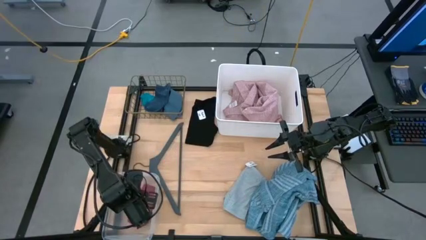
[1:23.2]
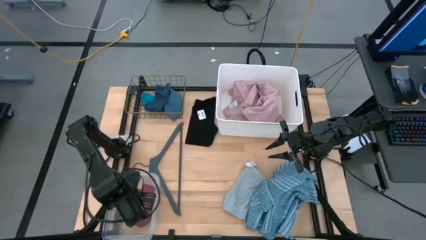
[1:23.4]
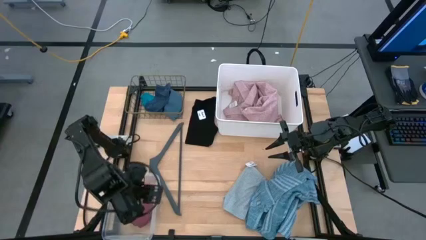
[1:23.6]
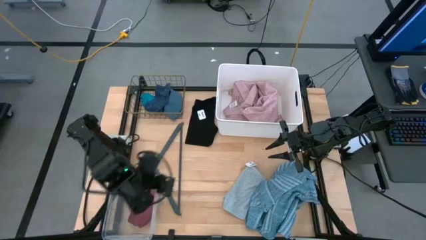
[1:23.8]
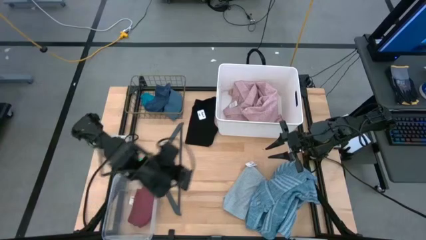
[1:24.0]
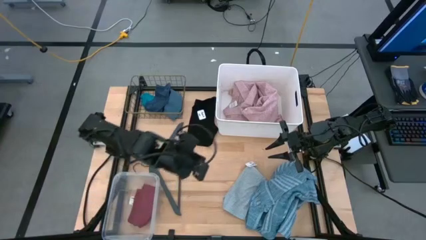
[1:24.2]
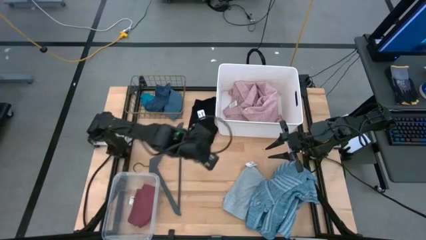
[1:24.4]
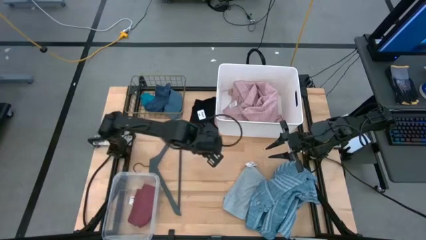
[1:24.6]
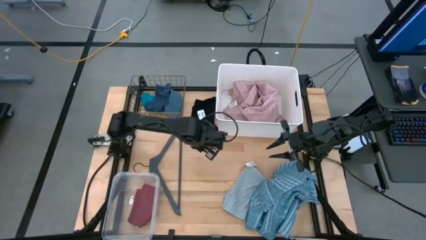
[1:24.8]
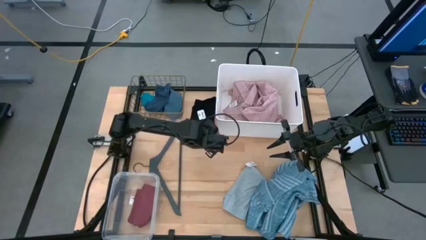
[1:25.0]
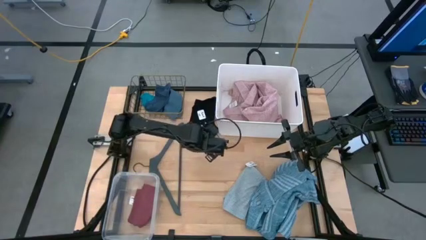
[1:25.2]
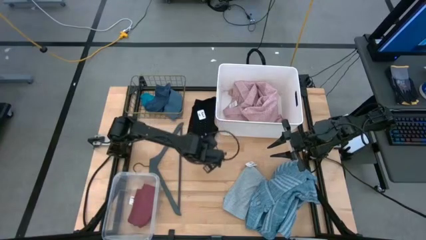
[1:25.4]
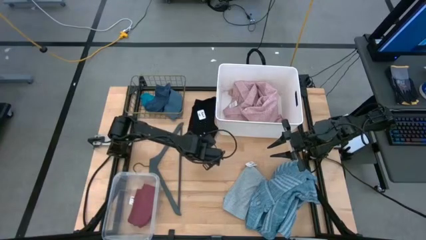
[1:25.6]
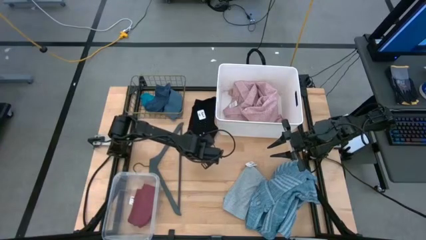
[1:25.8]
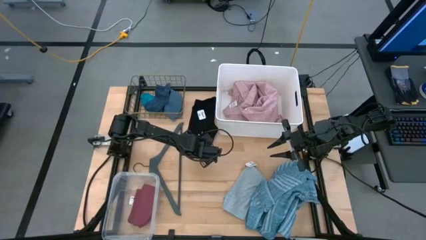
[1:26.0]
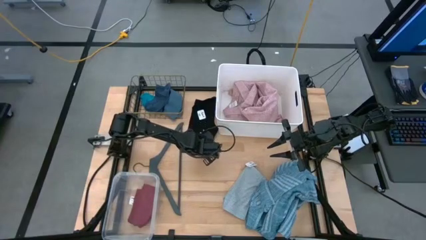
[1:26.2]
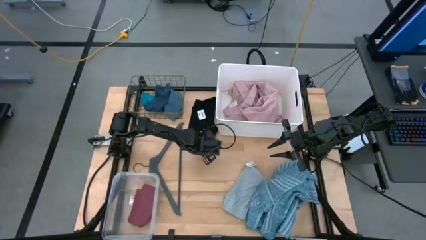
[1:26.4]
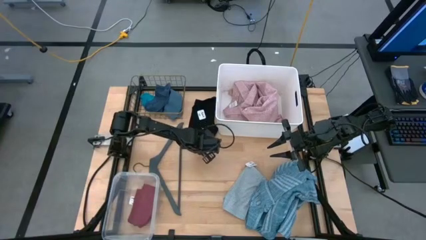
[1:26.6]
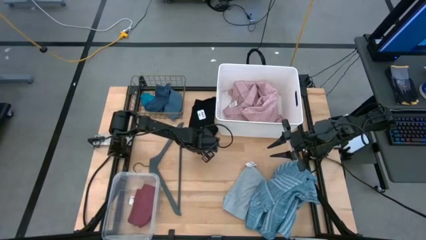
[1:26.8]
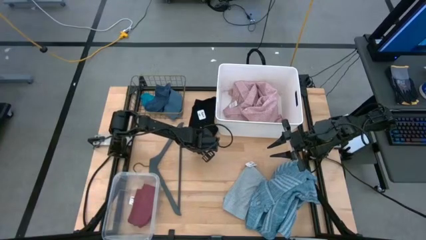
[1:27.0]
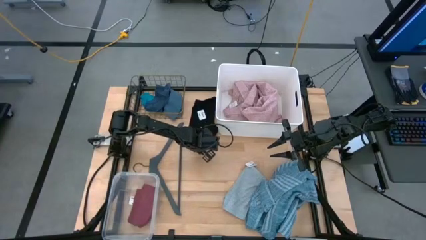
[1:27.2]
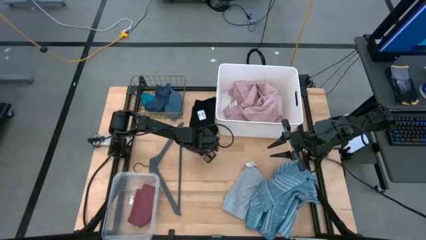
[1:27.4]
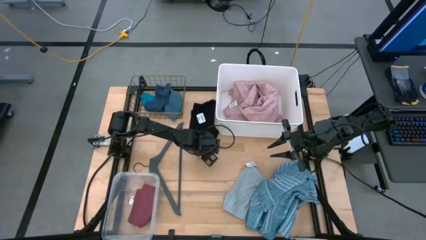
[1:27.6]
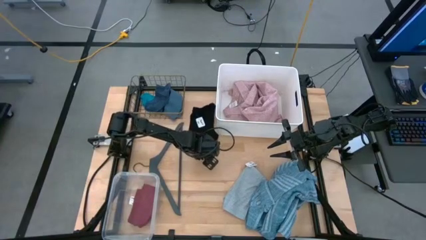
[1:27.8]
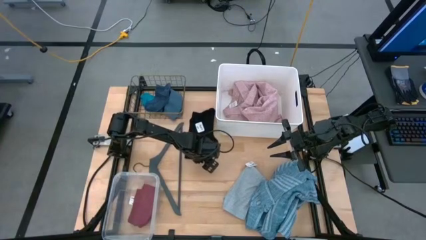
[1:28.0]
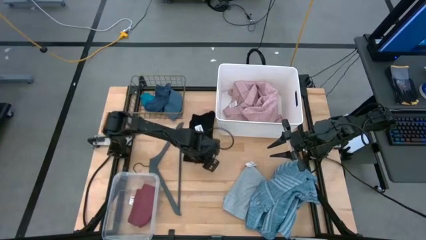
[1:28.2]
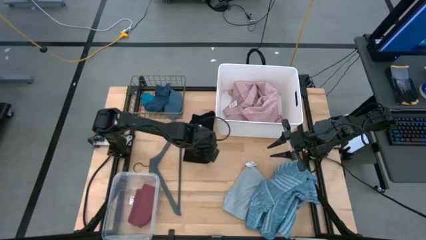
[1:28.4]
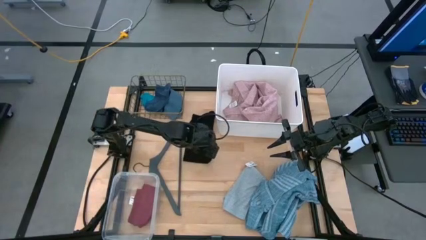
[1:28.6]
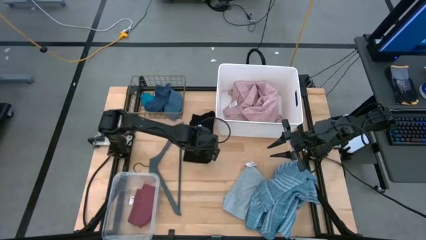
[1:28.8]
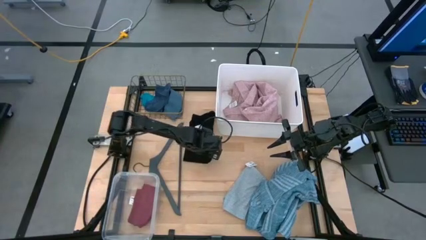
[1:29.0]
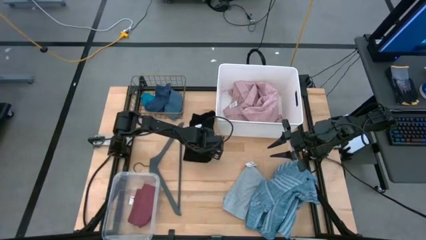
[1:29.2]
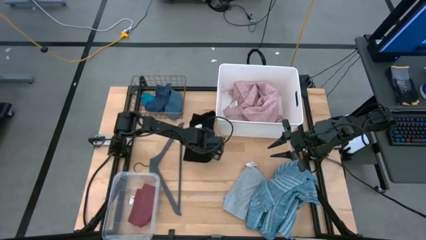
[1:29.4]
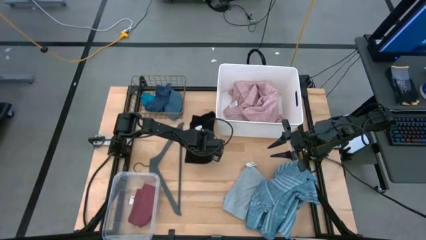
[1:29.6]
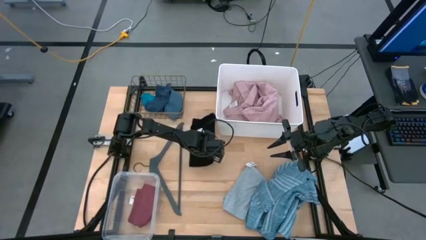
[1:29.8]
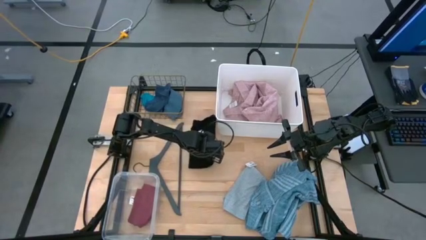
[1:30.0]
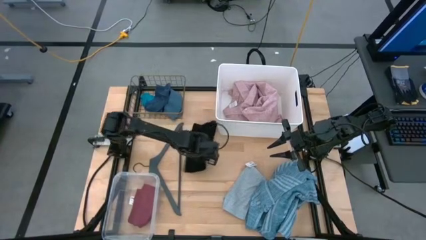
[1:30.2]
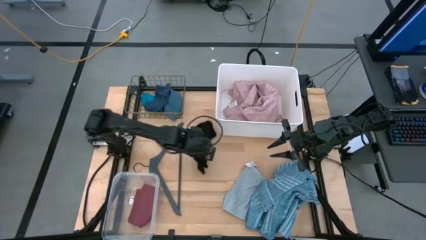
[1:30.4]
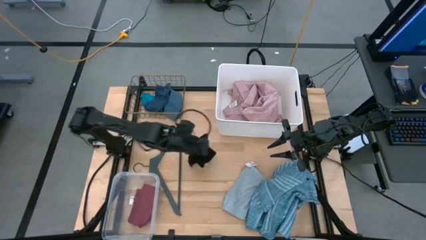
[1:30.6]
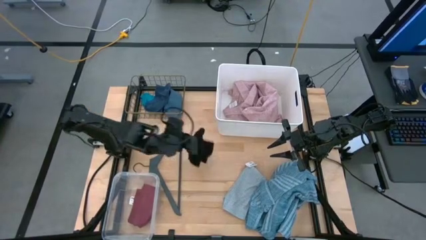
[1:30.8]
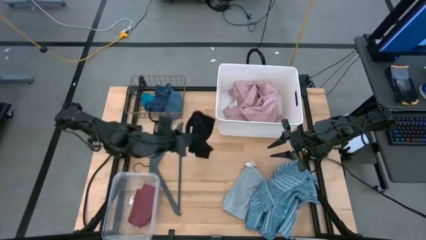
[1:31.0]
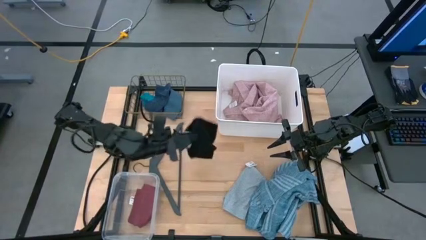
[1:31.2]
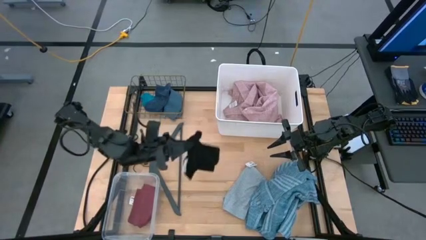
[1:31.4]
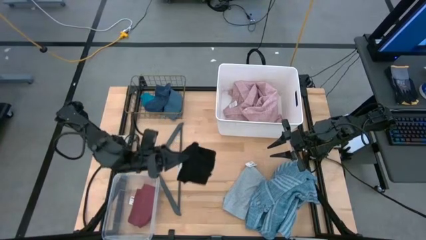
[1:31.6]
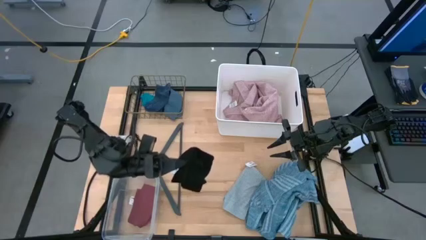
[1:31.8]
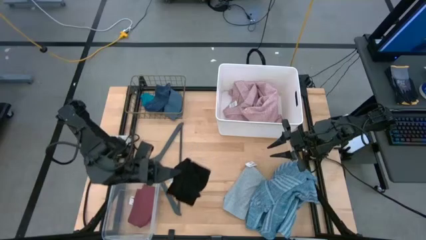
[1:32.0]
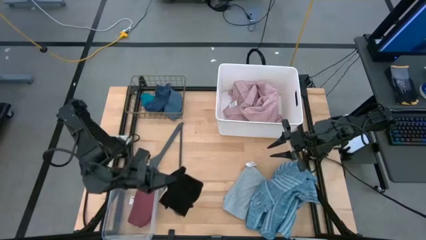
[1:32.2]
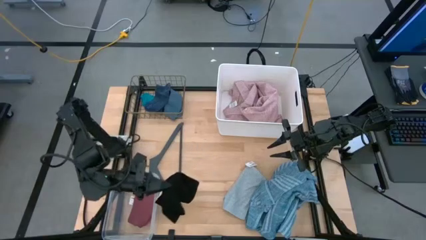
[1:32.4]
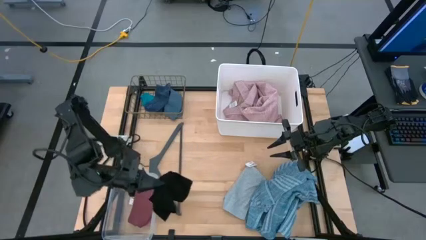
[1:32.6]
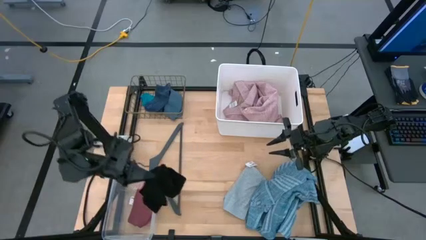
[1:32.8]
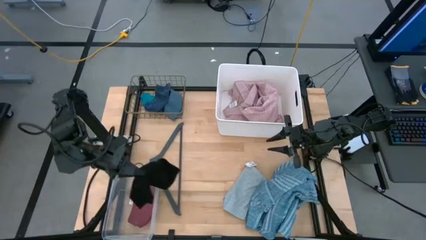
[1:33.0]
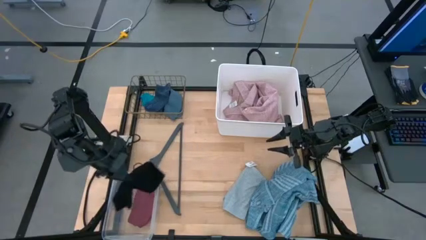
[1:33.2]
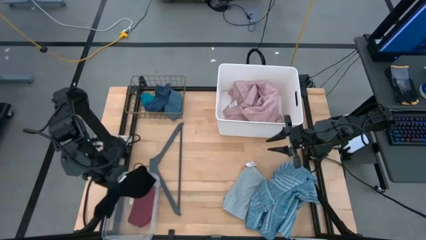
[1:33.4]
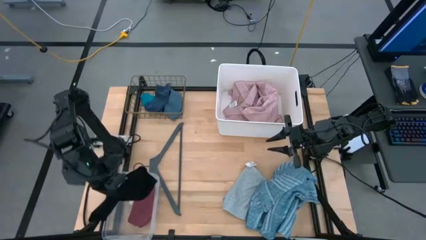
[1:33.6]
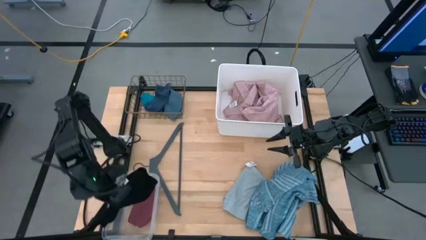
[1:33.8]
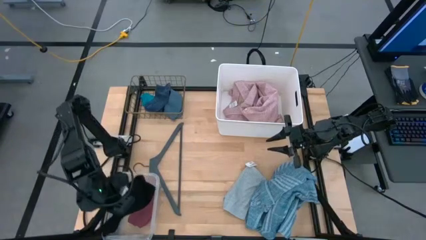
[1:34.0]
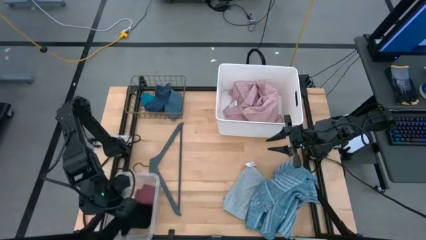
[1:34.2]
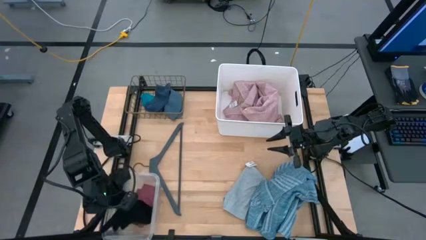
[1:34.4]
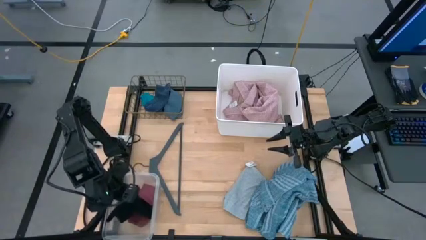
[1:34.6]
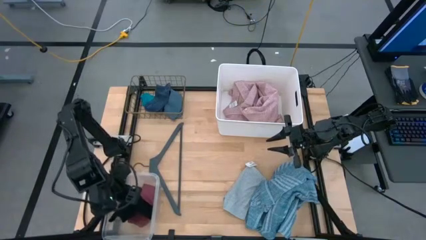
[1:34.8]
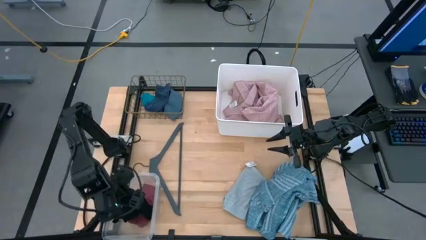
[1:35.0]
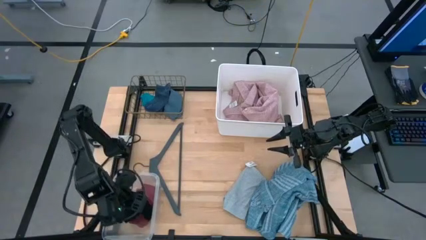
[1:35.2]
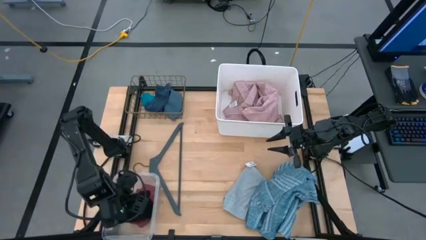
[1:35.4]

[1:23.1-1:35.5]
Task: Pick & Place Cloths
Put the black boxers in the transparent bin

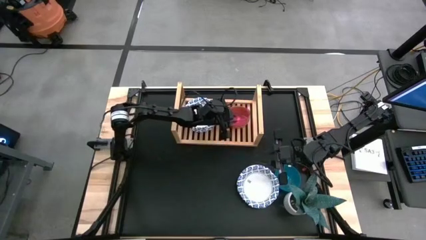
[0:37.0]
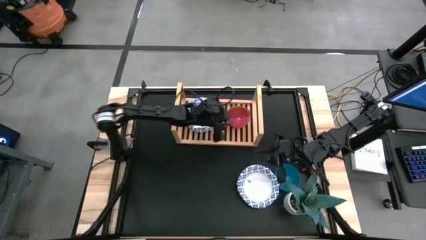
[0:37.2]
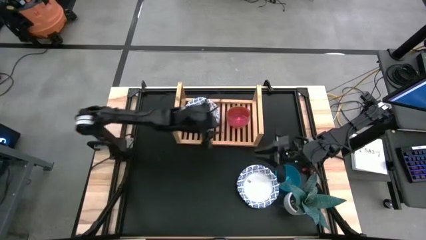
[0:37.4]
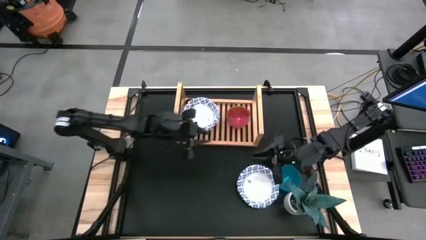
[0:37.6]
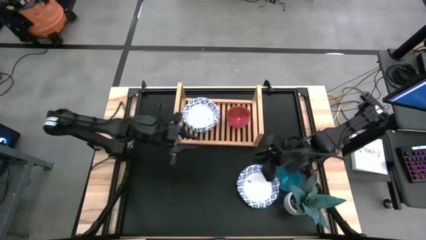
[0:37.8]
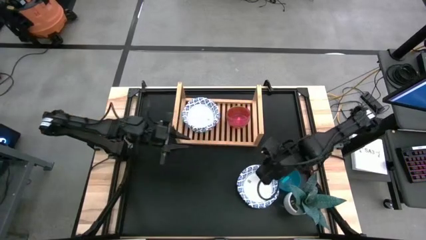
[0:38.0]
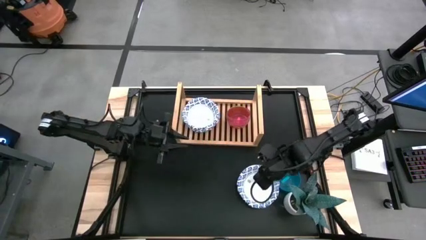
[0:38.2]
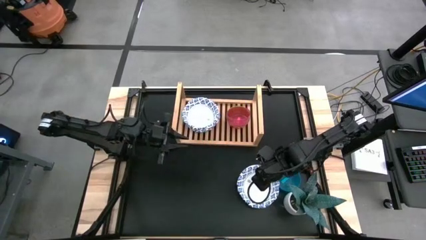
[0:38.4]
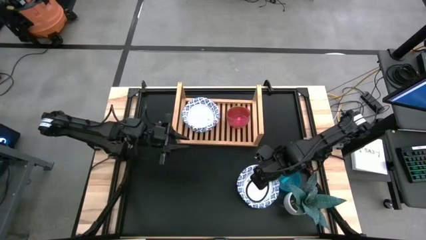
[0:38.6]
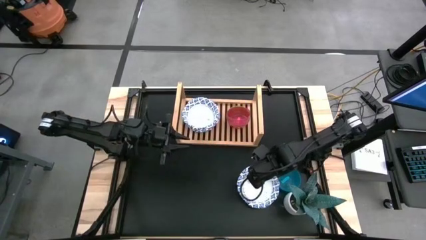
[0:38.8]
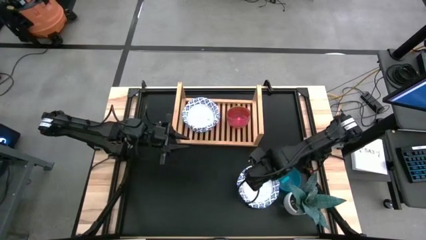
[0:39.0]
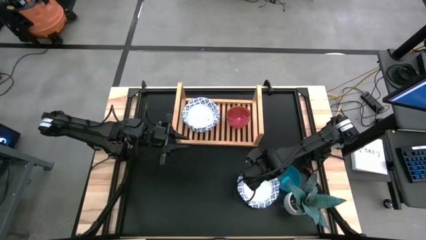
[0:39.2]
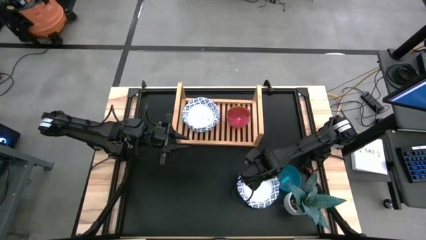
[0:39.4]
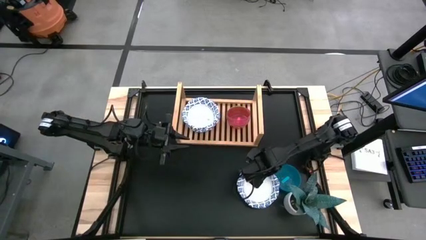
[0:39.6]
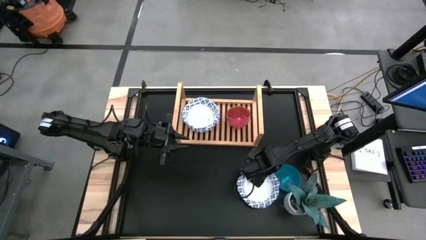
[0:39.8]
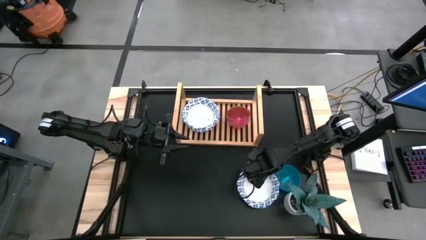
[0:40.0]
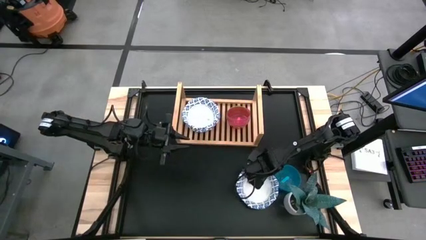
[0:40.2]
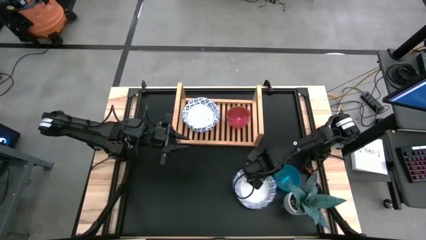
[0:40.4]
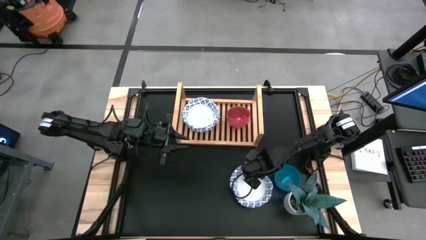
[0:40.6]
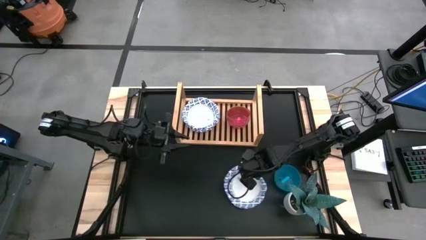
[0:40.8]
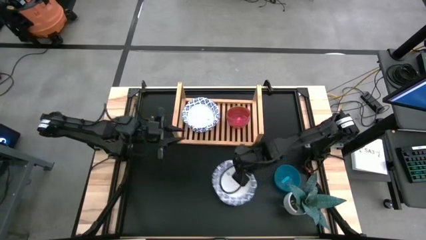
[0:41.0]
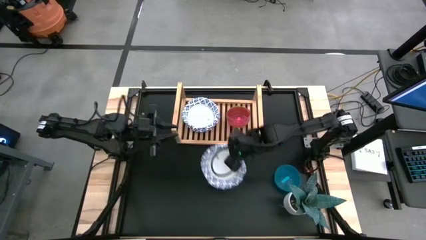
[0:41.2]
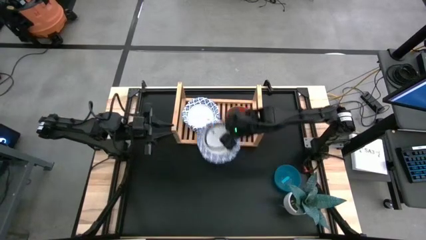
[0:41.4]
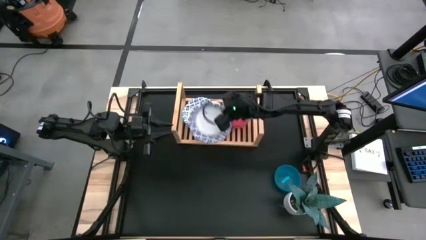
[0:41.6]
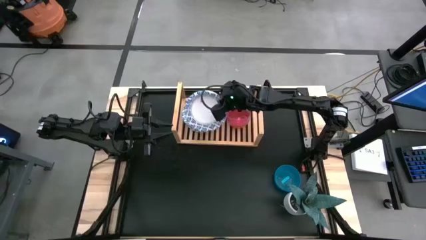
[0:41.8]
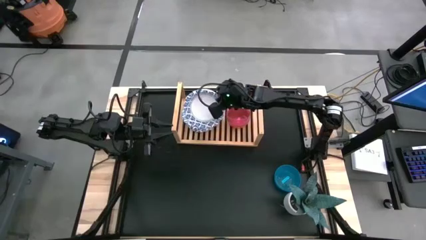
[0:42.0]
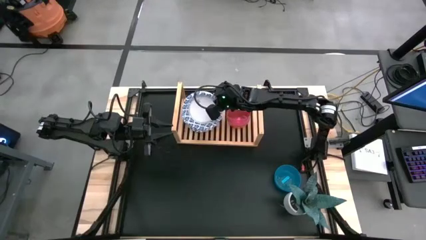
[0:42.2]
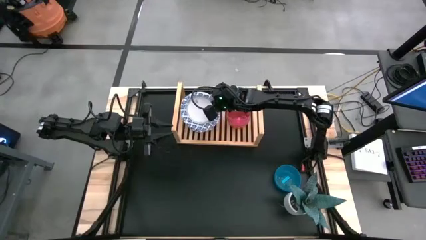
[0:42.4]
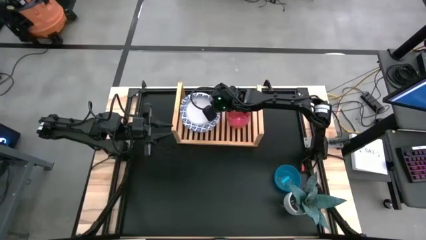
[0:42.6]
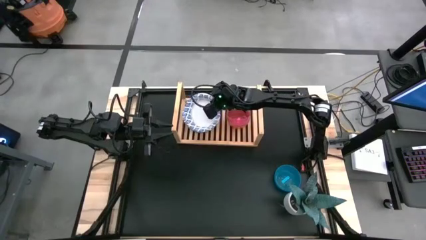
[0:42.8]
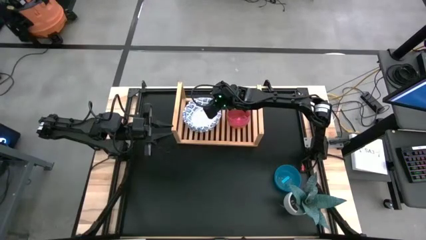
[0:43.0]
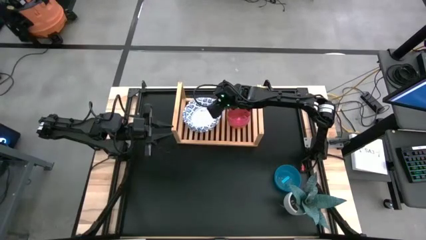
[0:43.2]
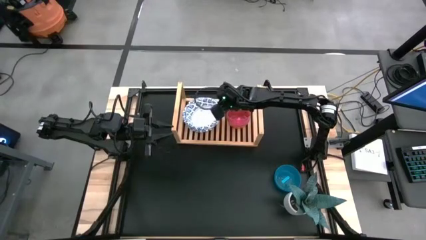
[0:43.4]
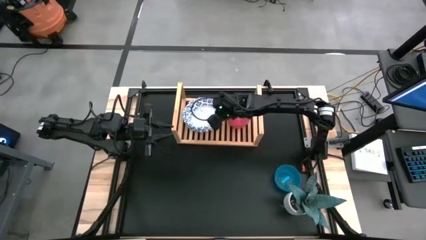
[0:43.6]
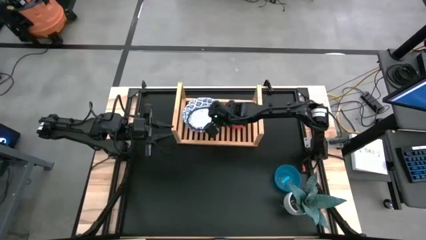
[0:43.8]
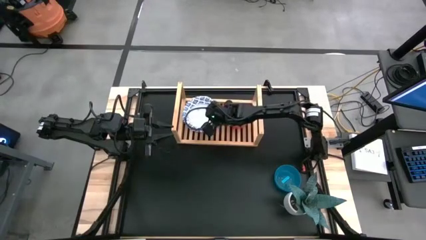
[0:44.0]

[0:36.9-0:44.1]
Task: Place and stack bowls onto a shelf
Stack the large white bowl on top of the large white bowl on the shelf
